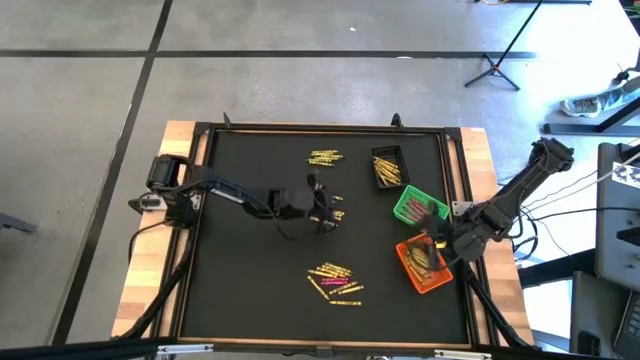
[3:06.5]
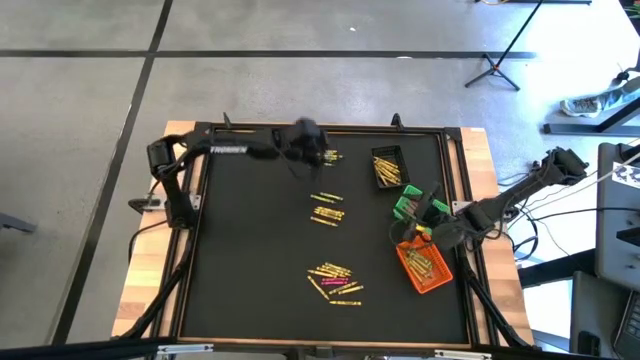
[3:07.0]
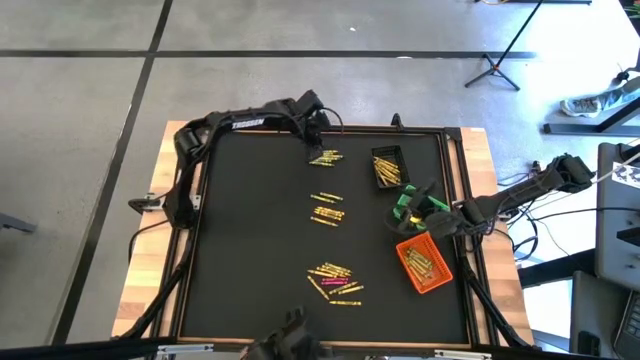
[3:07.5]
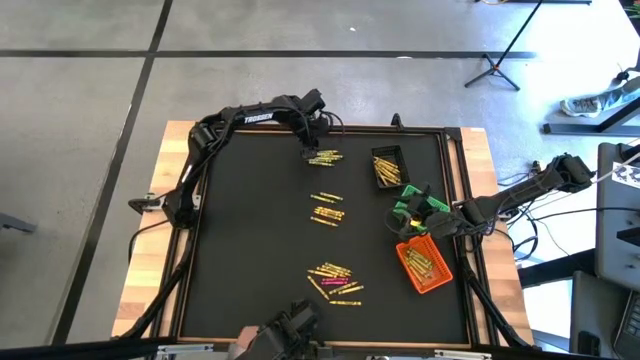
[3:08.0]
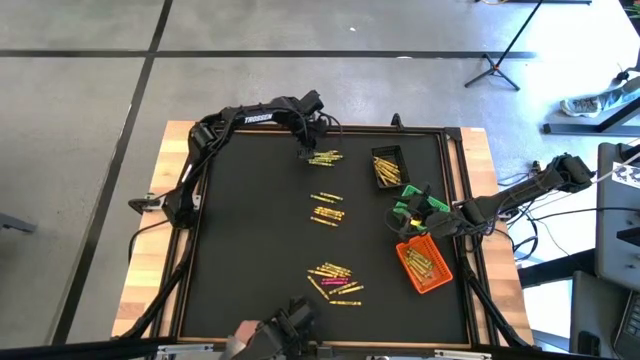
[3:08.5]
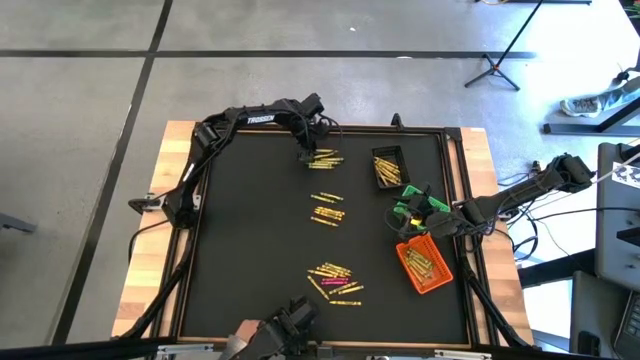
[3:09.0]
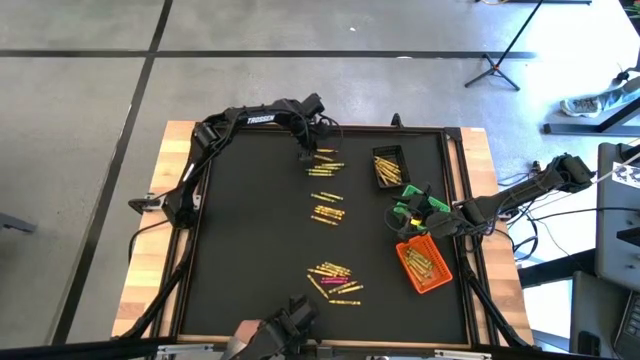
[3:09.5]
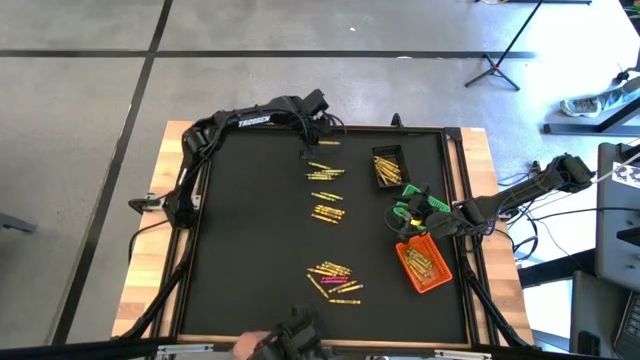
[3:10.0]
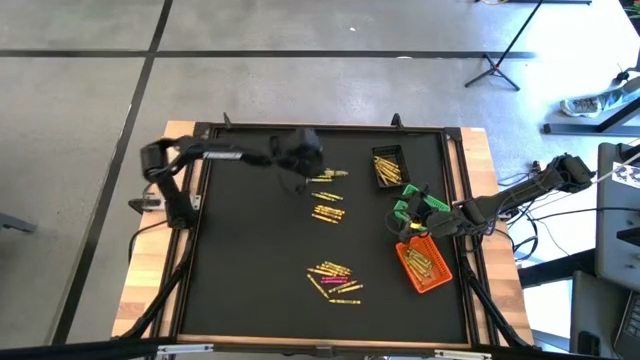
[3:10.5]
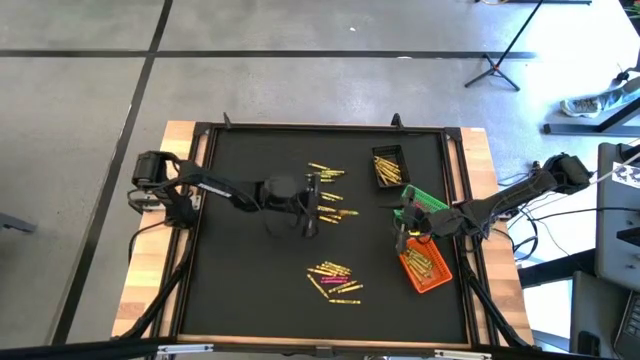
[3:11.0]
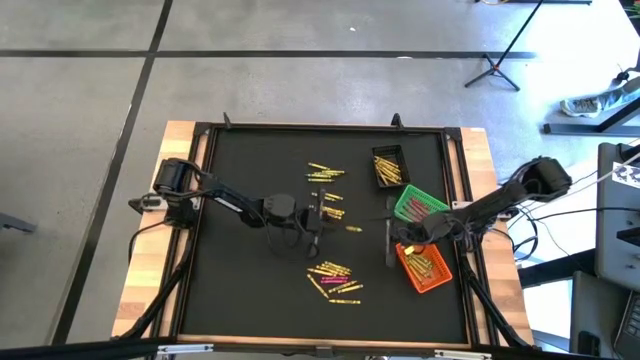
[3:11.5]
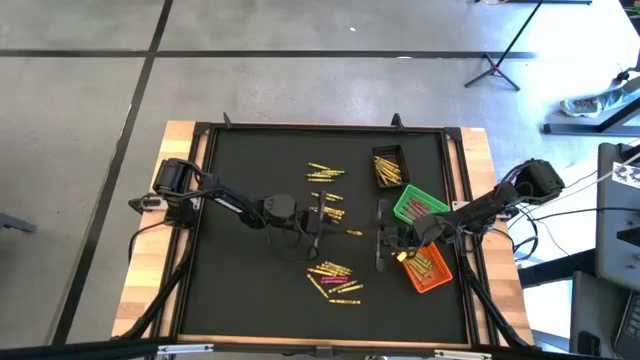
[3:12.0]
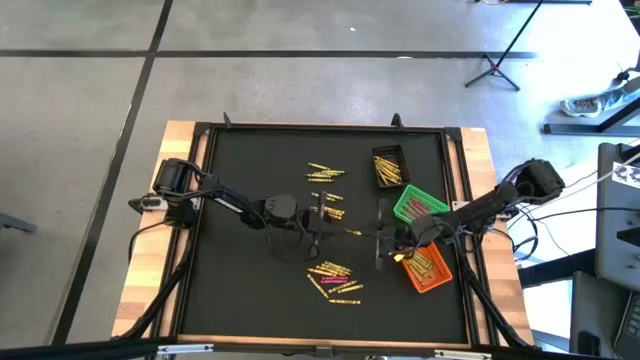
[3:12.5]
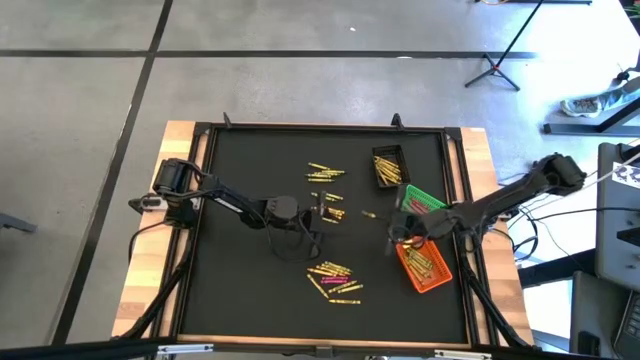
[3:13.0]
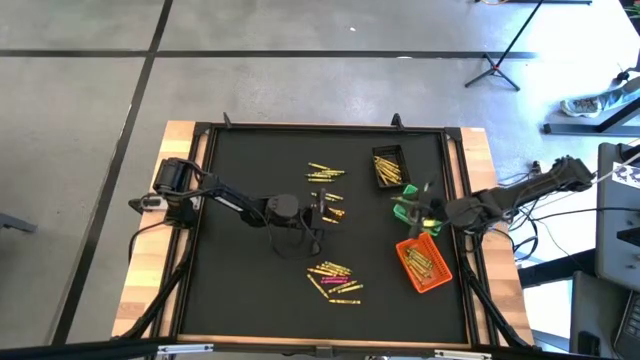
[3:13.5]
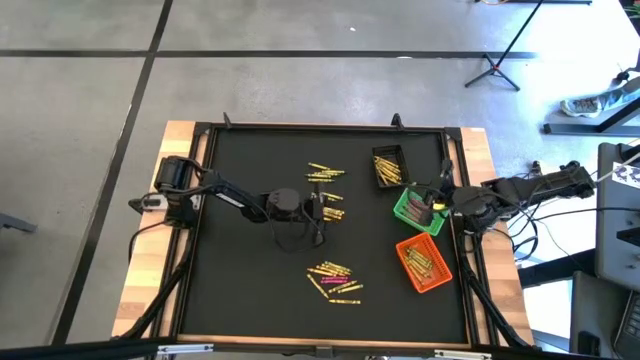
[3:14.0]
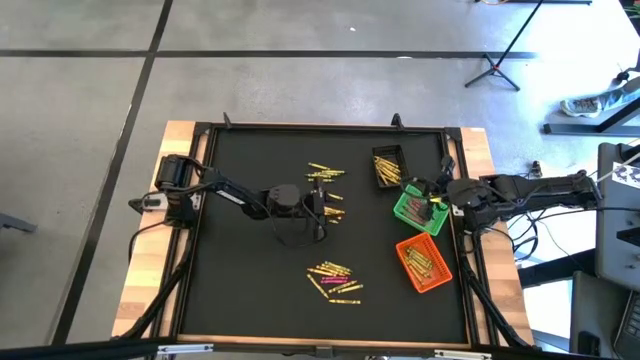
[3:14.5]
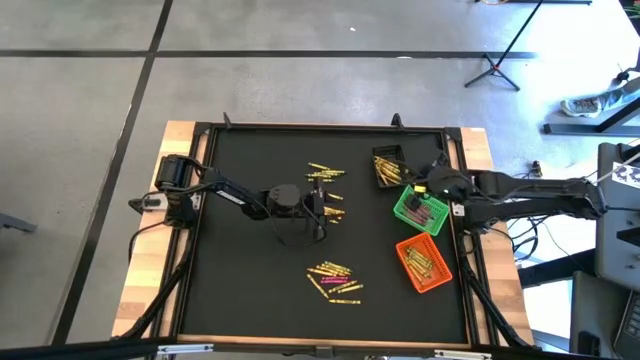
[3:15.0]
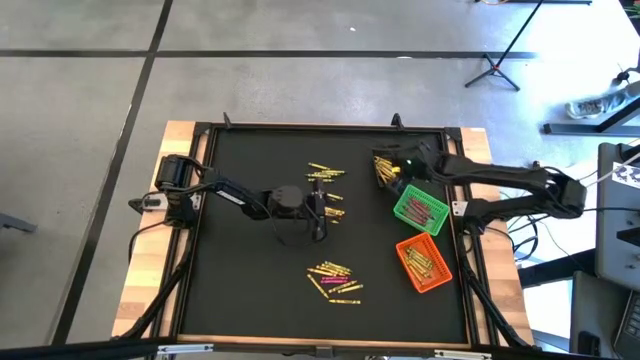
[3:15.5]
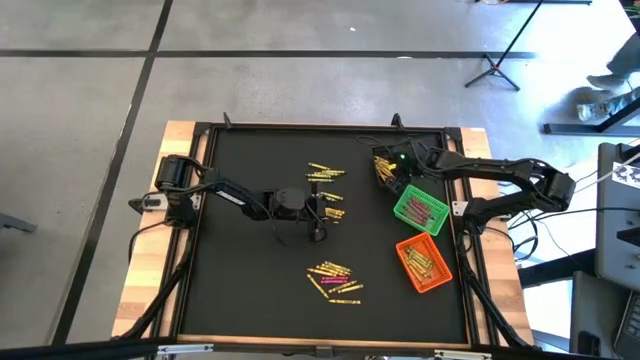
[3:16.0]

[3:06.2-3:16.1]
Task: Sort crayons
Put the yellow crayon into the black basket

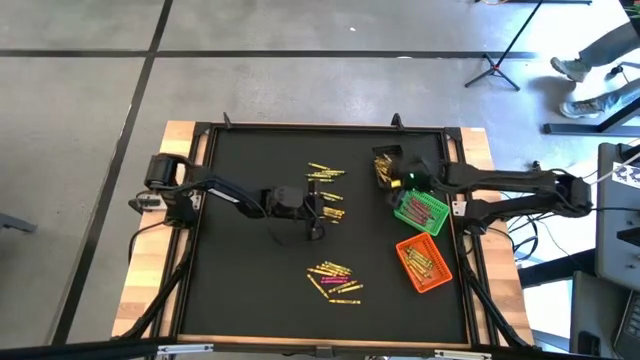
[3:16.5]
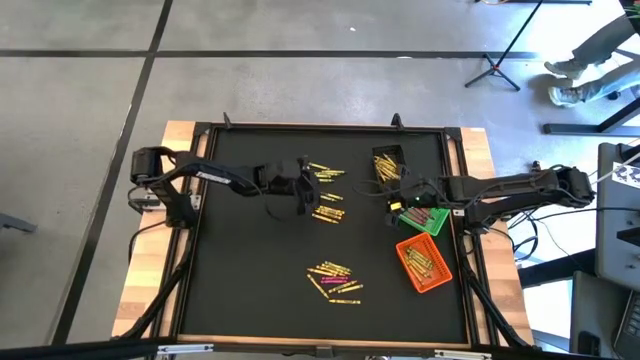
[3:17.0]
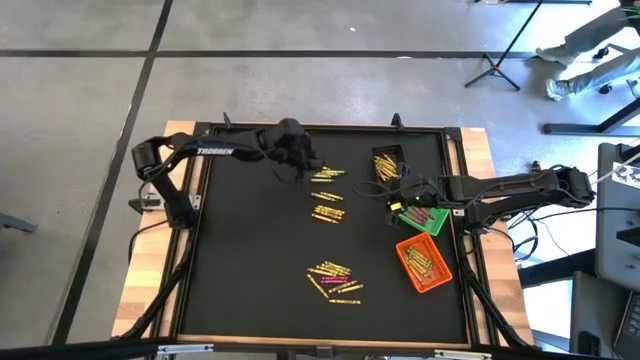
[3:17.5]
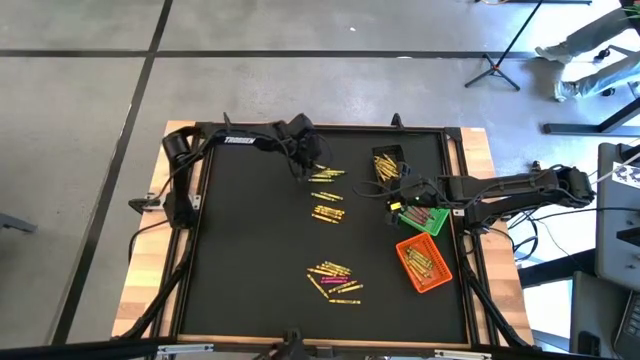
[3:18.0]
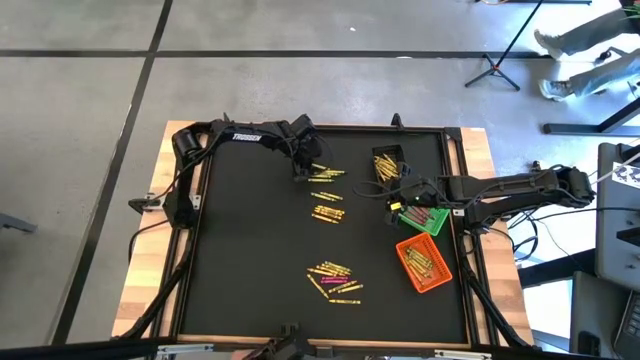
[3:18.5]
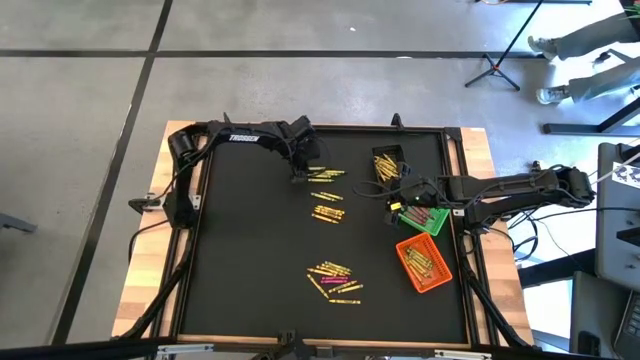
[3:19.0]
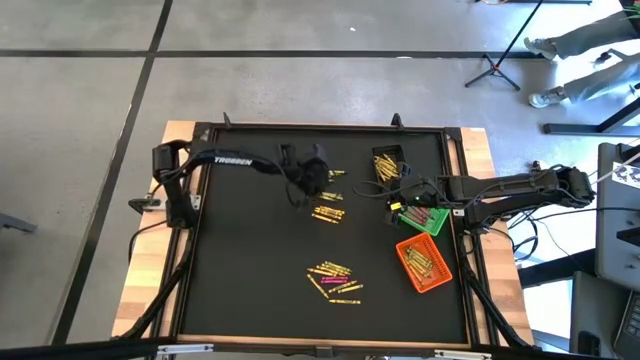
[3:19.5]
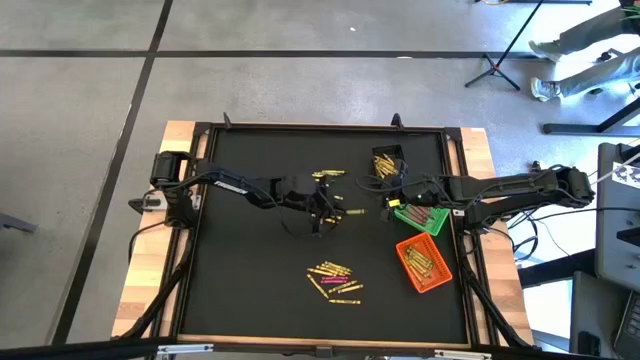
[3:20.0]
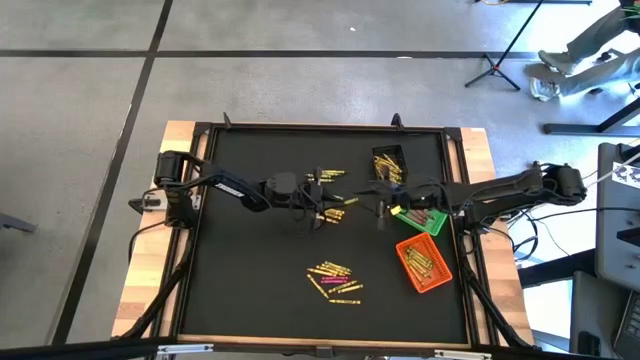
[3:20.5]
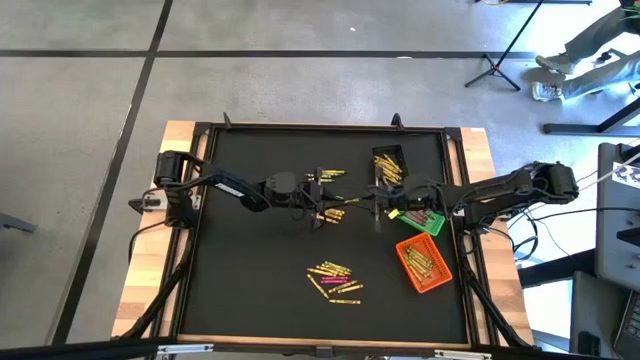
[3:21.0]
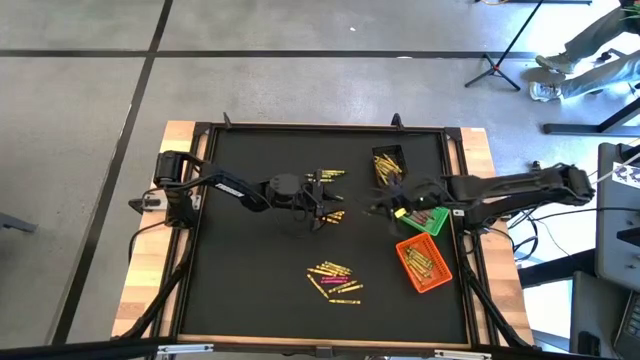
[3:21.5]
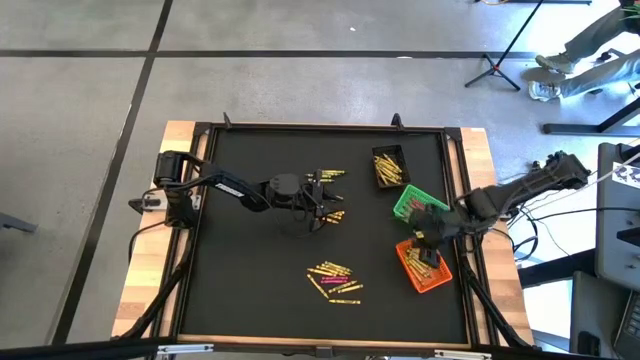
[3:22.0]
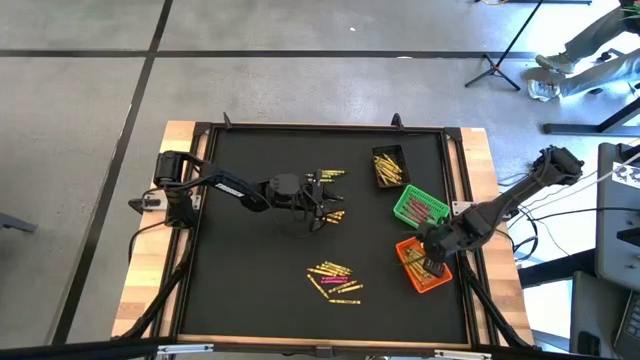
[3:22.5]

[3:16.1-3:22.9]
Put the green crayon into the orange basket

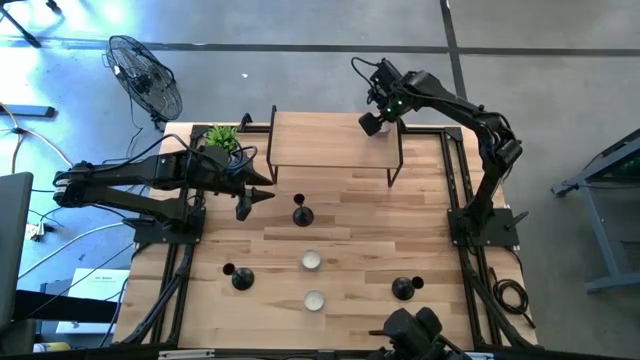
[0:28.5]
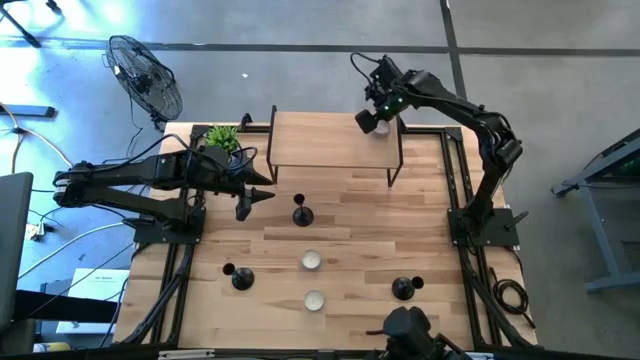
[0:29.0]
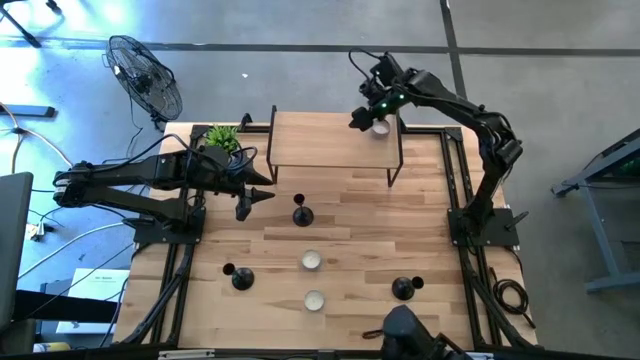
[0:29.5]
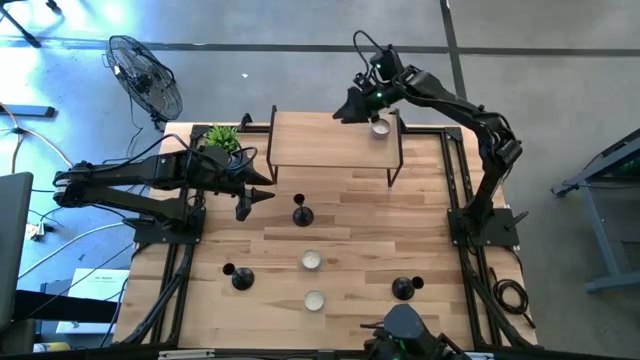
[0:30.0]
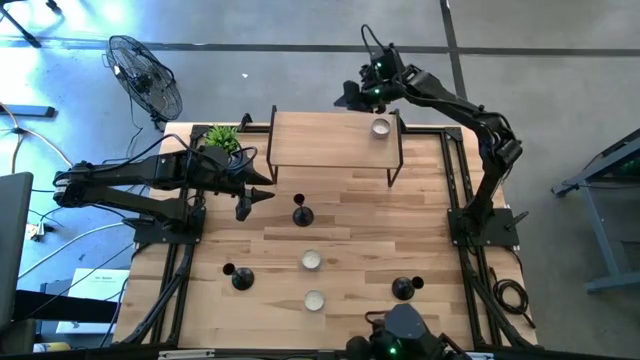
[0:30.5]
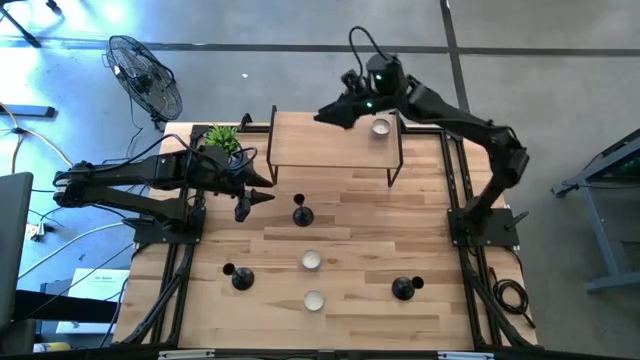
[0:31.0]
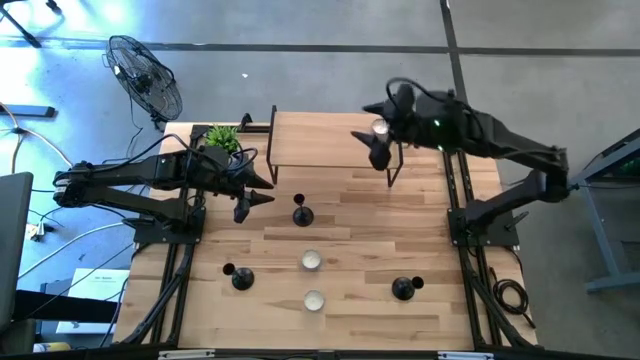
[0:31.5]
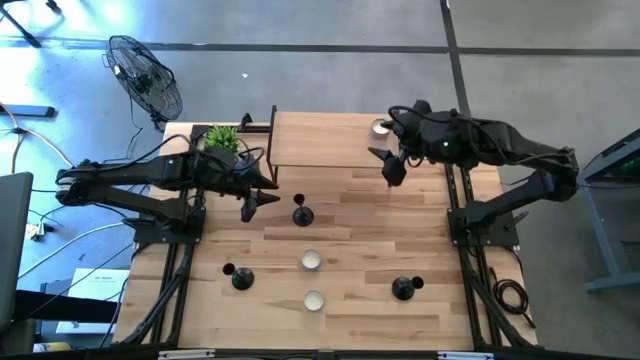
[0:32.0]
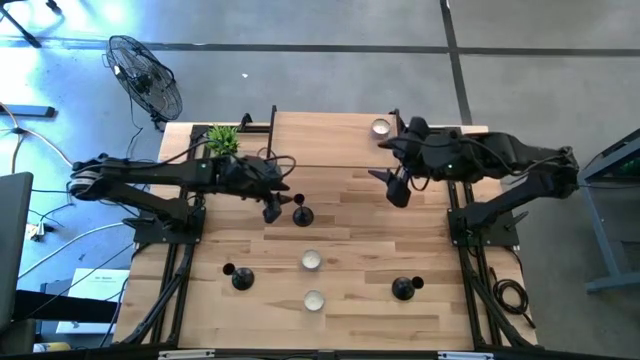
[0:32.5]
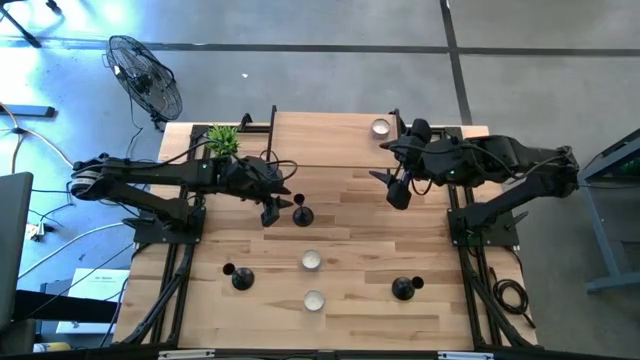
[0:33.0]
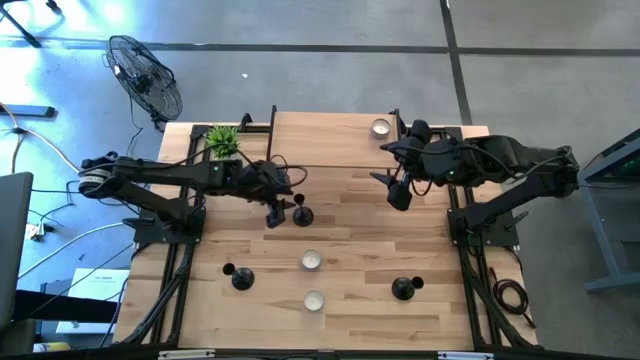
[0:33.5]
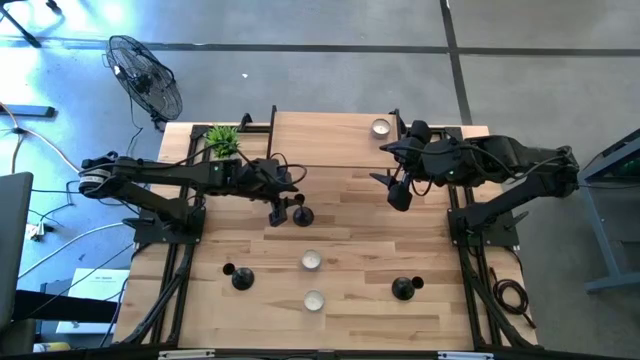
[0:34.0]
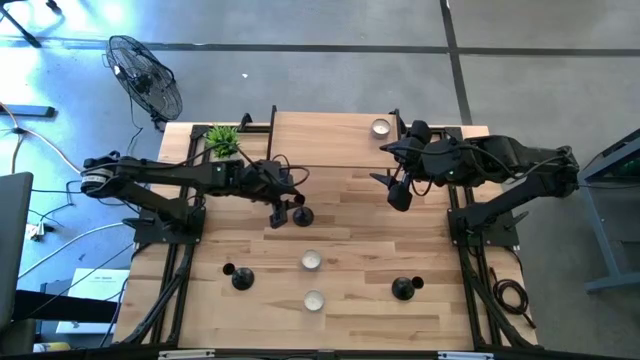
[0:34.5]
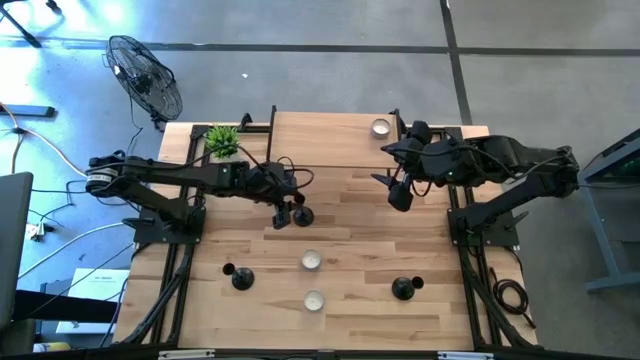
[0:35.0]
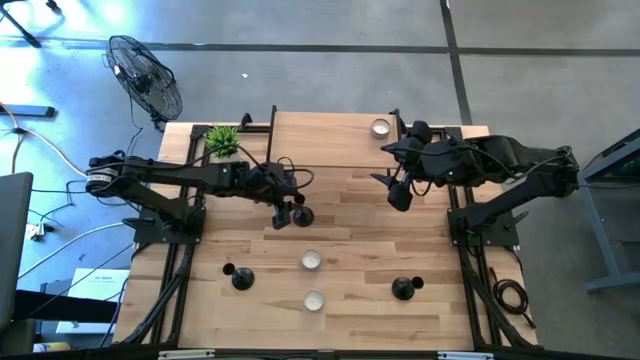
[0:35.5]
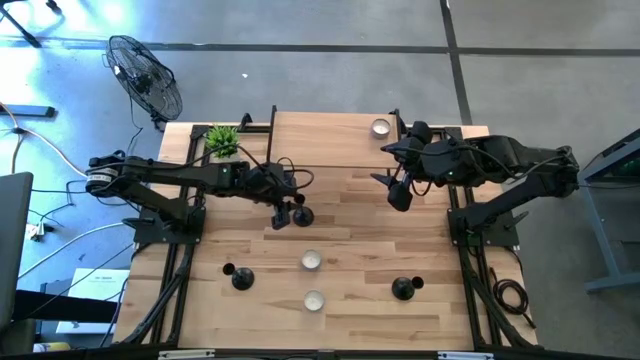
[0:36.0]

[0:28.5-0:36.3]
Task: Pick & Place candle stick holders
Put the top candle holder on the shelf
